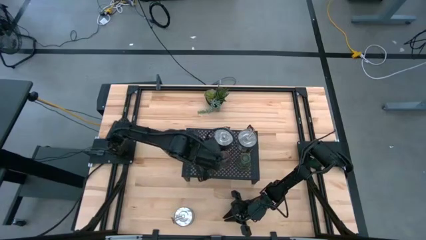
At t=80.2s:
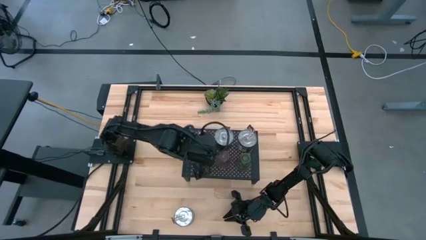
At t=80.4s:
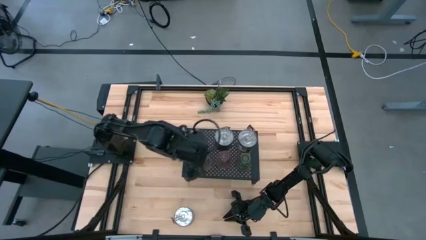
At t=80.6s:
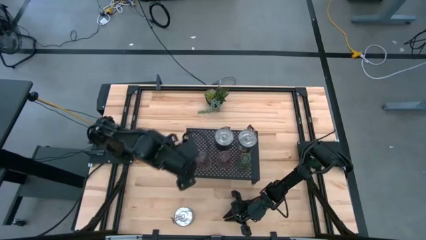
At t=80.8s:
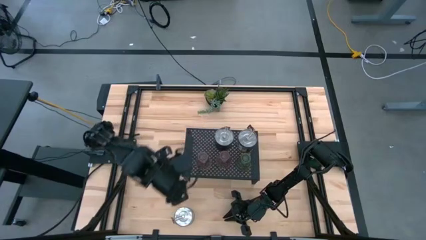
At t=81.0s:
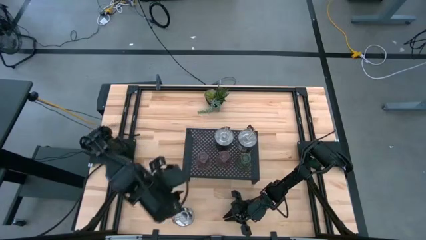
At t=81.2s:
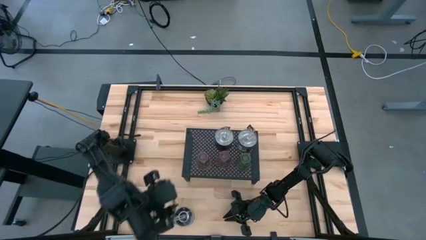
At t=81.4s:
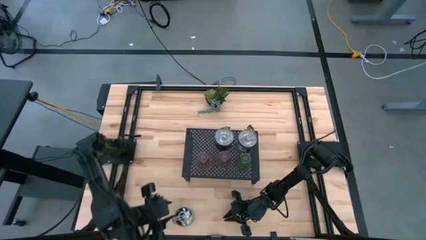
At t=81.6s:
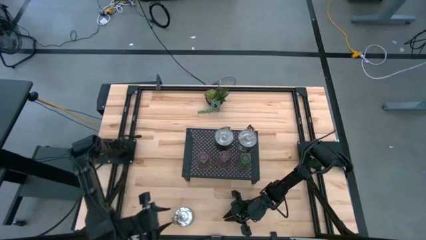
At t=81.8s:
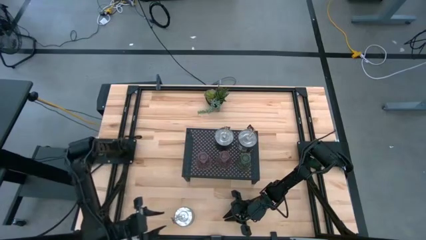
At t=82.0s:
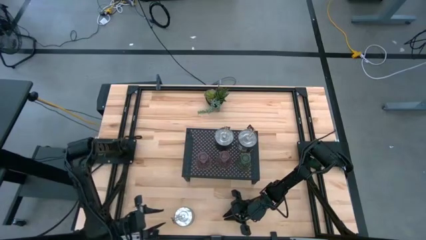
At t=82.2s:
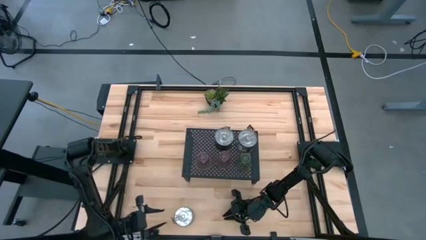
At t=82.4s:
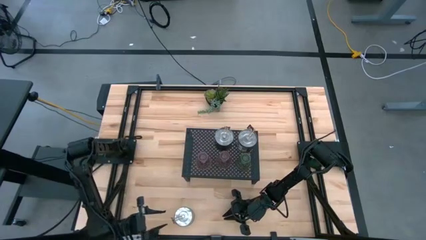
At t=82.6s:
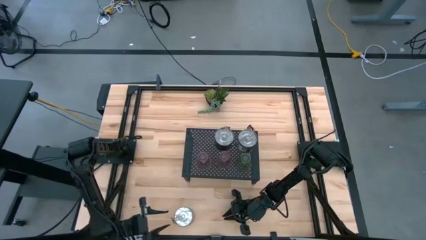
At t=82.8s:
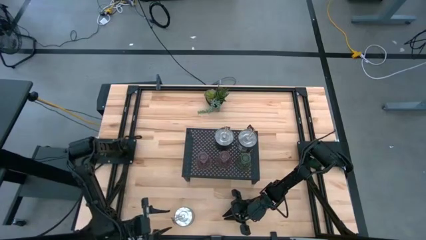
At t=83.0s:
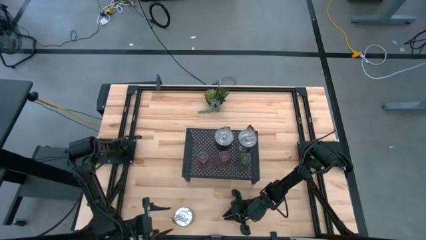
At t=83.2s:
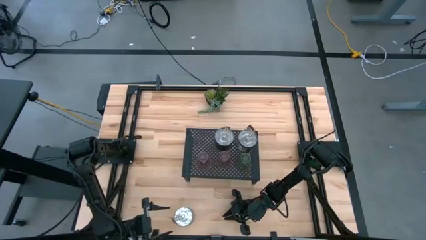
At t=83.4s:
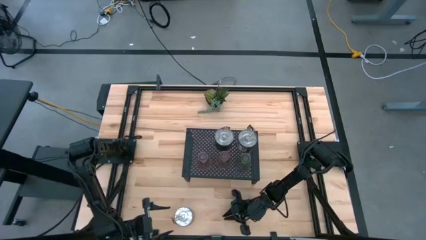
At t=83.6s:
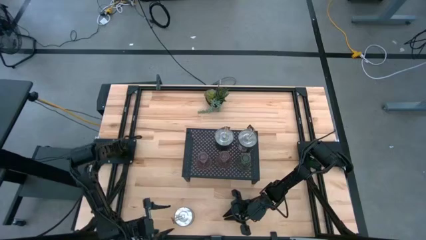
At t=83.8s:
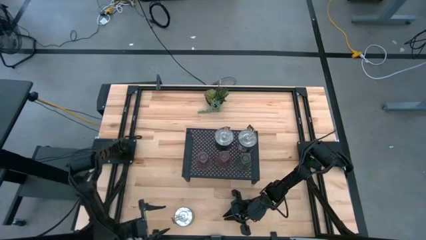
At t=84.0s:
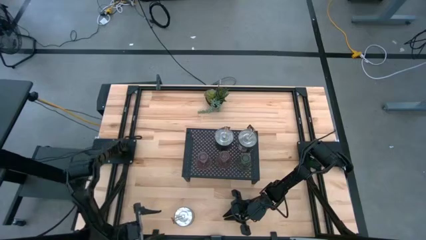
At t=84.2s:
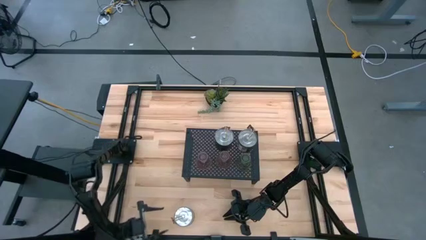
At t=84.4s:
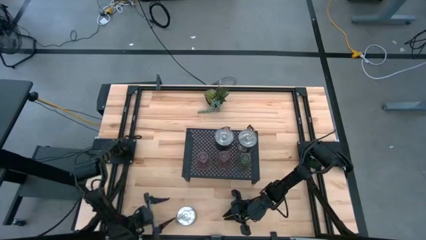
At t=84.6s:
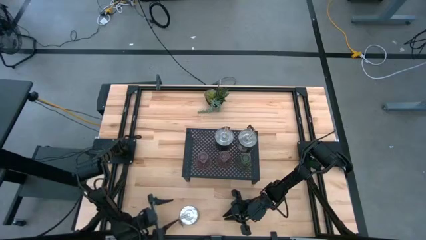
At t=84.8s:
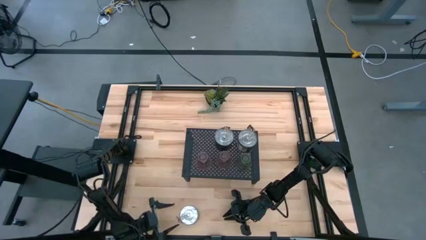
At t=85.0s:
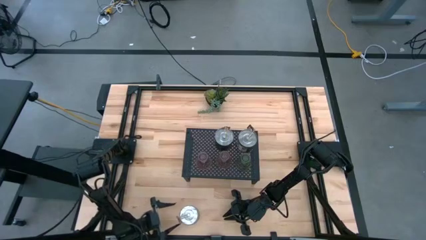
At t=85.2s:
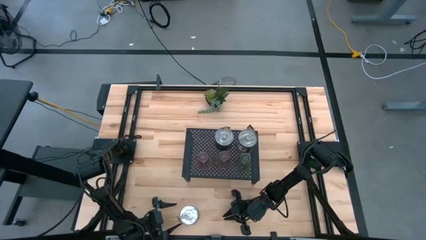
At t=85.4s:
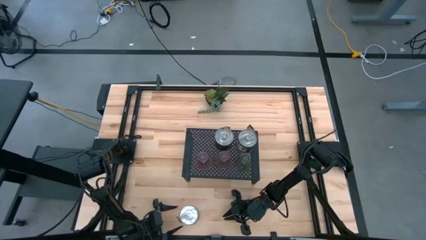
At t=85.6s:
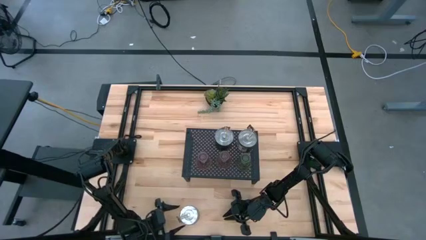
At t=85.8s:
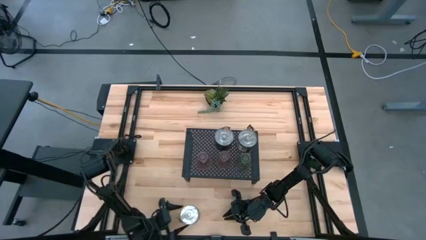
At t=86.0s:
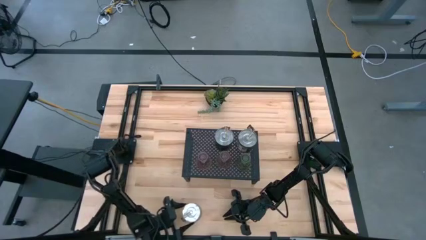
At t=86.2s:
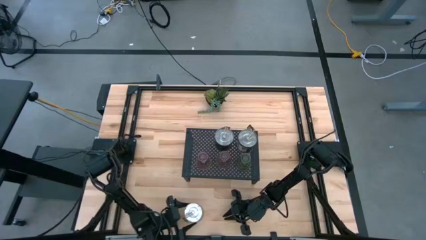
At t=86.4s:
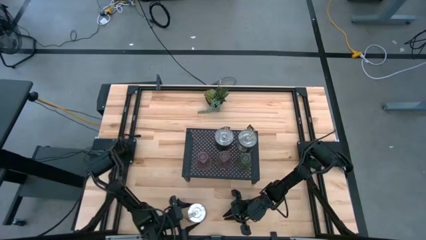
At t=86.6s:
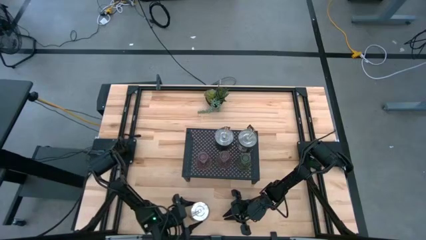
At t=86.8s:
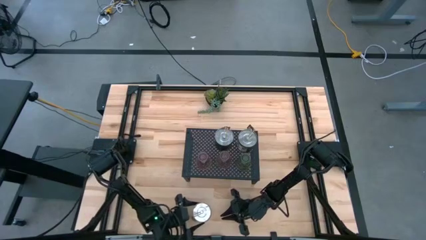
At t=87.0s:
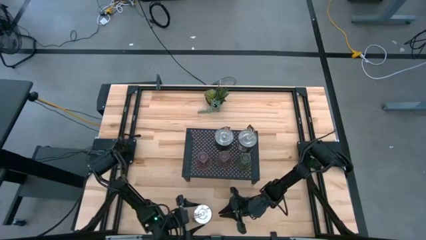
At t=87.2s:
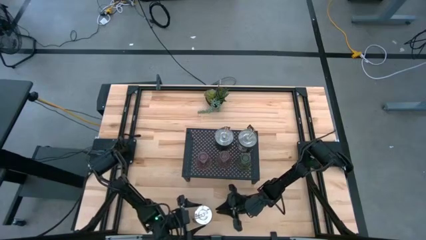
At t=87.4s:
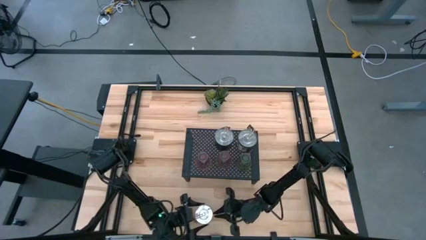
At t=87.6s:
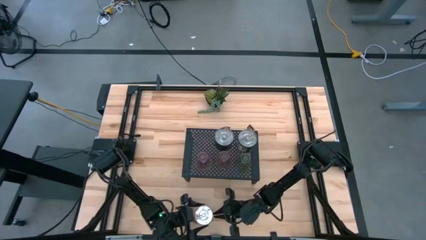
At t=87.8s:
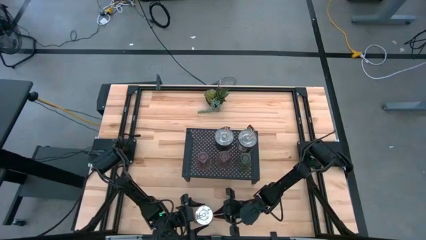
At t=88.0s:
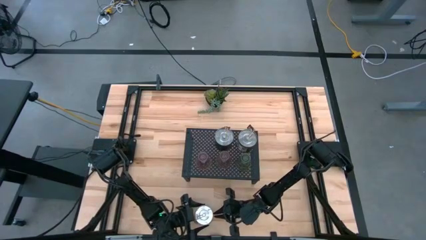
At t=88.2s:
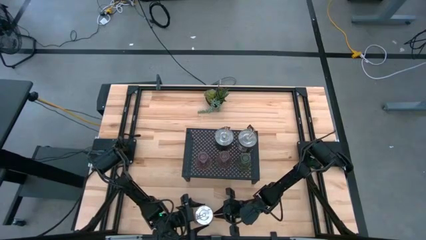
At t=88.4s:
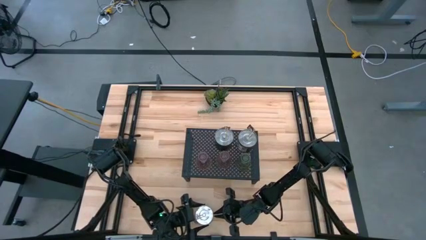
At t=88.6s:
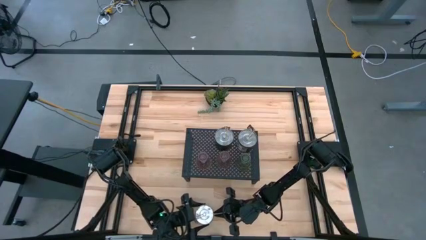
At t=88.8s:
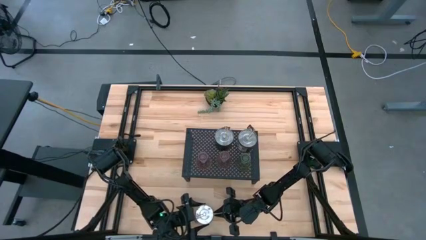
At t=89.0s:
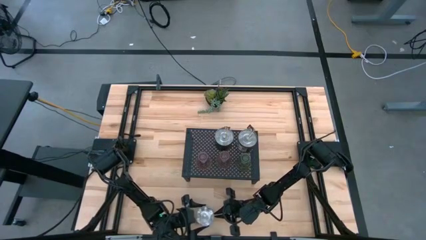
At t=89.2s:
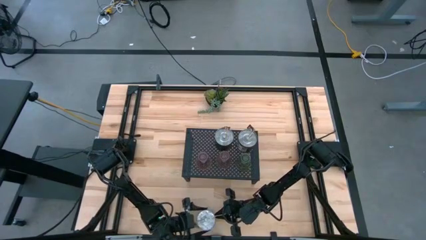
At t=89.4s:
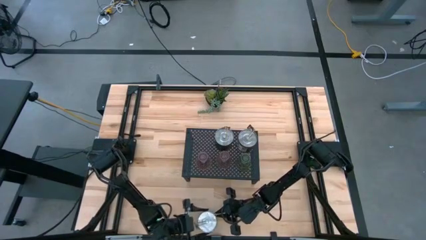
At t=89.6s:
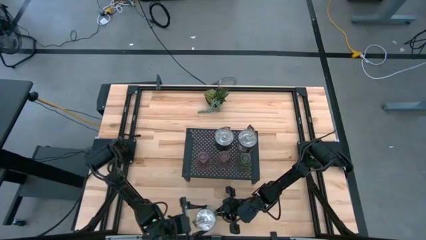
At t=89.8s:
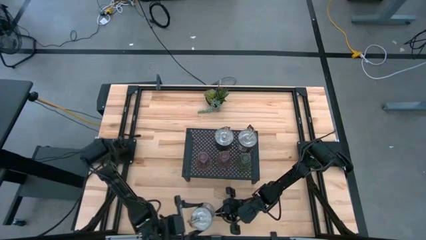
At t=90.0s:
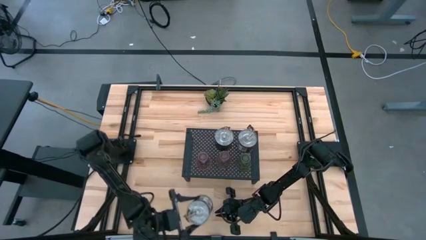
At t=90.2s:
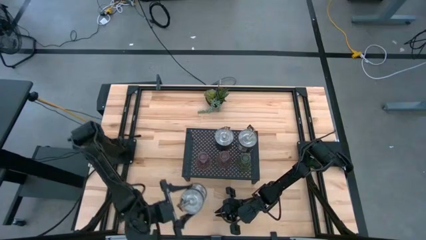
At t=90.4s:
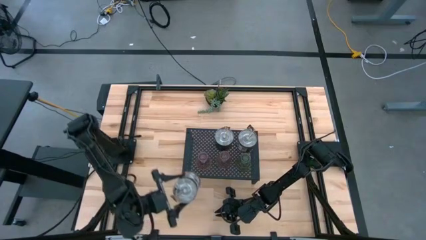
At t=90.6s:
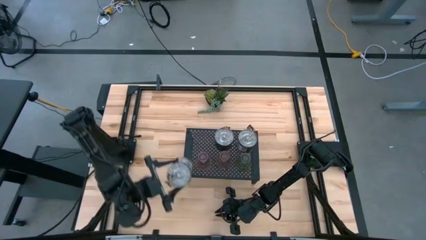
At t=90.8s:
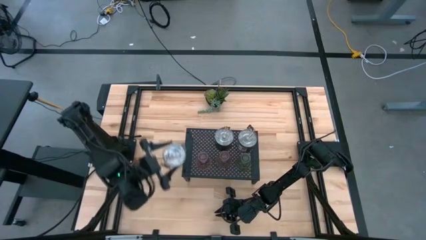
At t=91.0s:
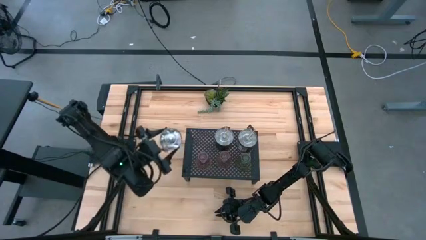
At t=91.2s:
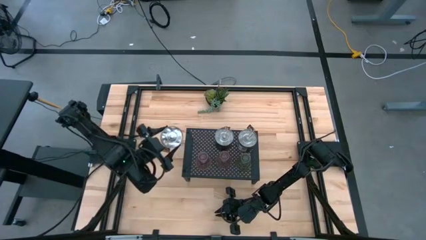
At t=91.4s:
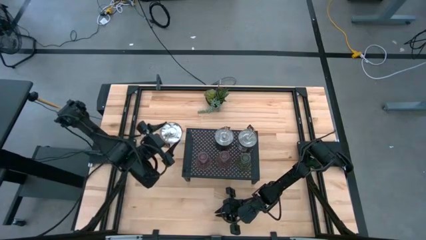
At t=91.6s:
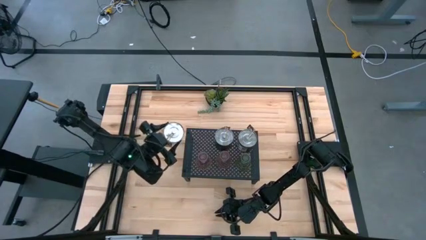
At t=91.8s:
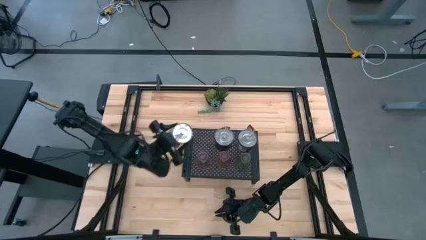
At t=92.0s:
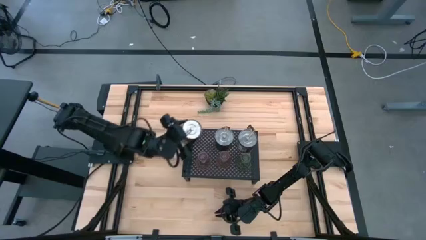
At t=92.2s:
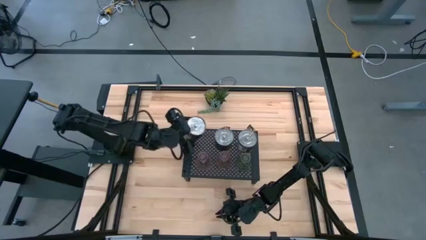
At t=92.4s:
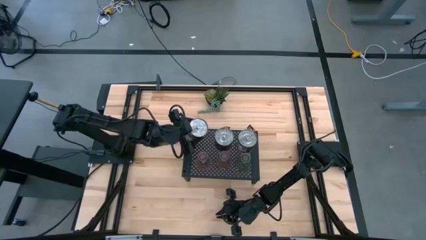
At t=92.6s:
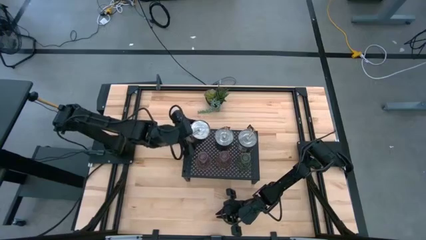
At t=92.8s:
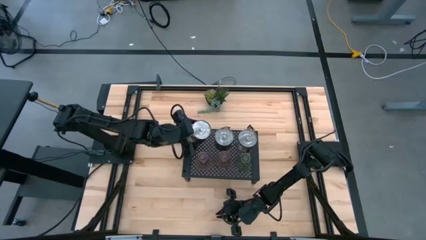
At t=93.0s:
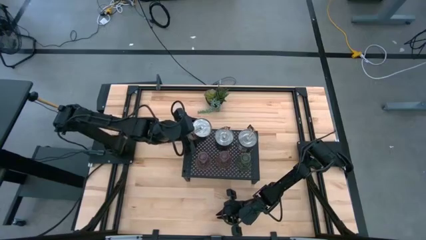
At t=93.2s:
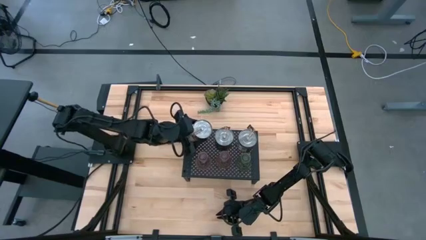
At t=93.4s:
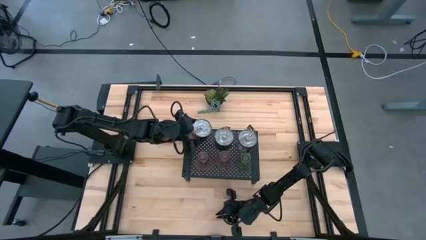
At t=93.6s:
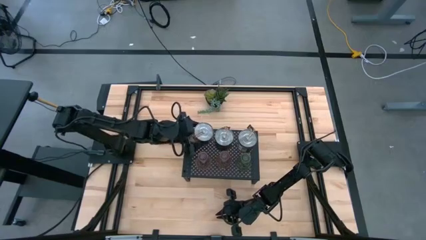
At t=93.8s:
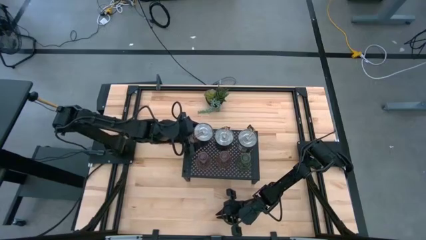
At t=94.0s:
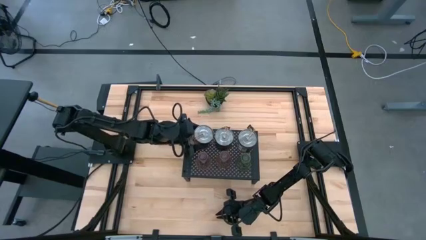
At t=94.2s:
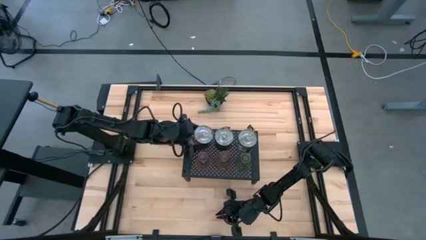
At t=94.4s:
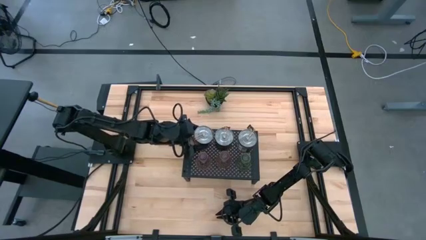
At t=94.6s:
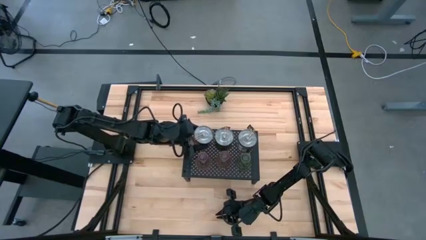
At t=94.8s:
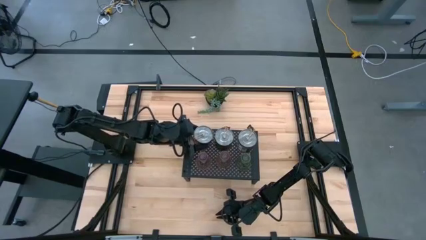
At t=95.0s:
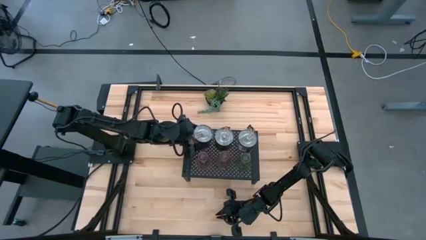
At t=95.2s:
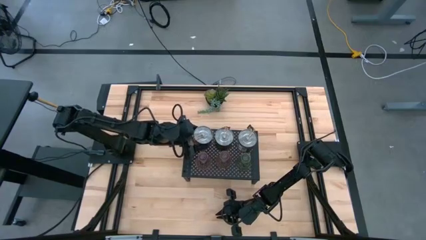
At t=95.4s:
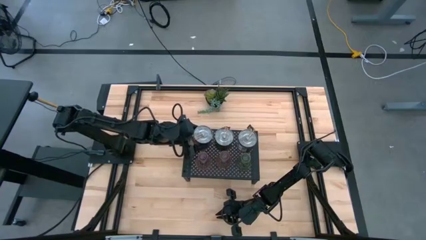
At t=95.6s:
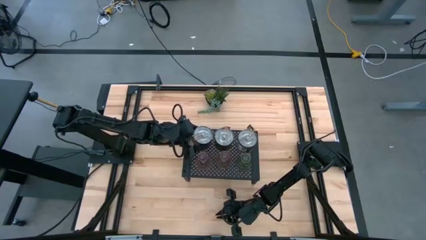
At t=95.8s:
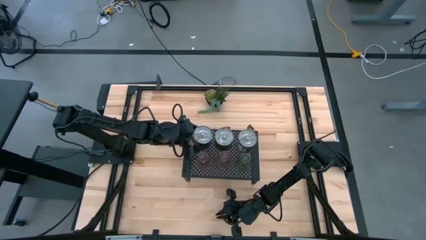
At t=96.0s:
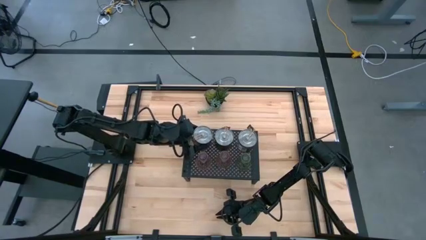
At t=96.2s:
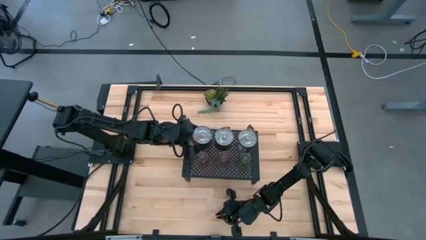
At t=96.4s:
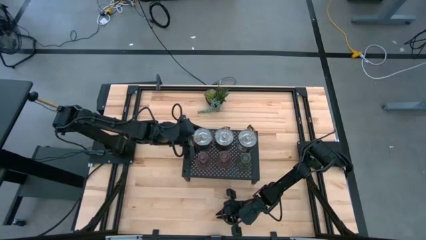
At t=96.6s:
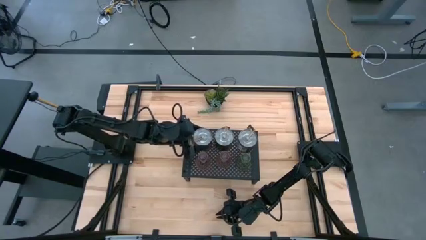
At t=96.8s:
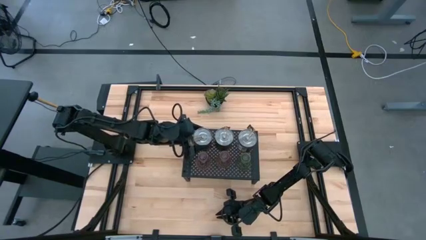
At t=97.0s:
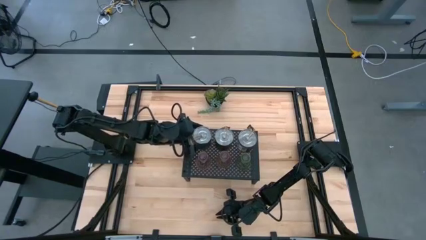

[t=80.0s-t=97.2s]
Task: Pick & Place candle stick holders
Put the silver scented candle on the shelf aligned with the other silver scented candles
